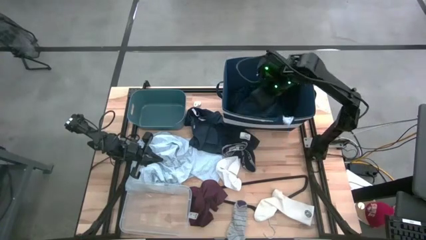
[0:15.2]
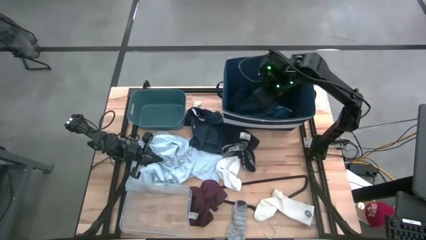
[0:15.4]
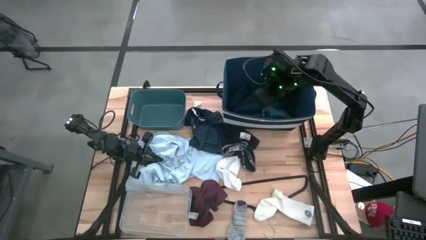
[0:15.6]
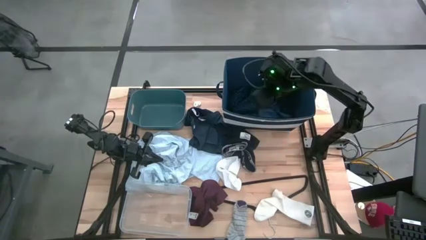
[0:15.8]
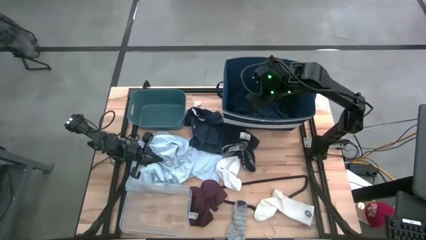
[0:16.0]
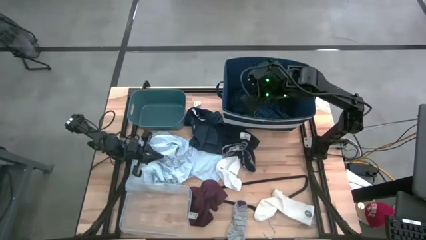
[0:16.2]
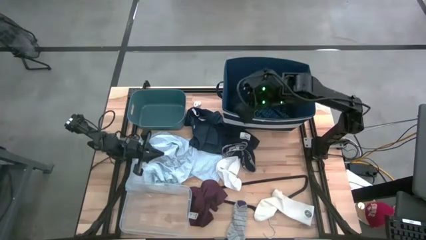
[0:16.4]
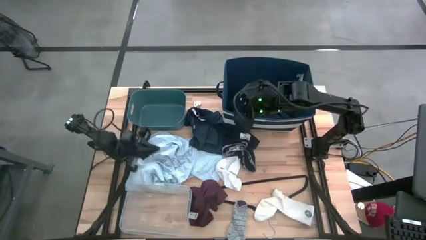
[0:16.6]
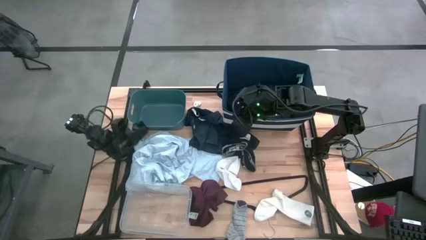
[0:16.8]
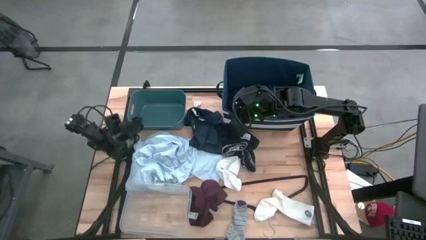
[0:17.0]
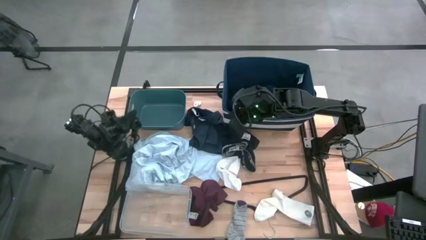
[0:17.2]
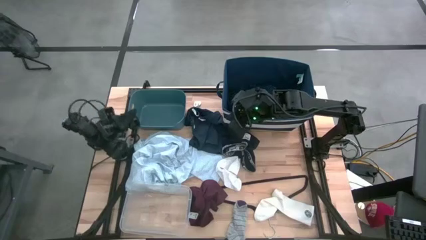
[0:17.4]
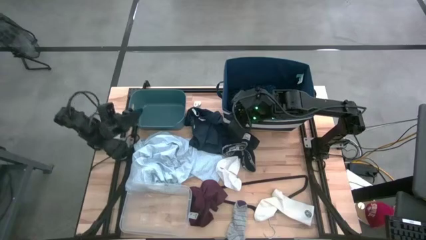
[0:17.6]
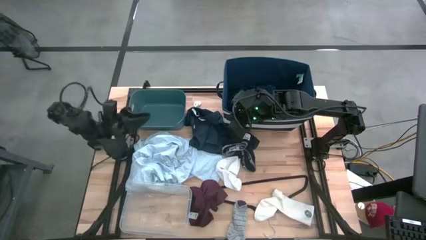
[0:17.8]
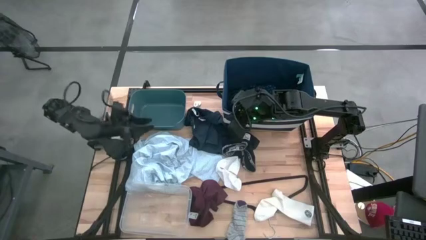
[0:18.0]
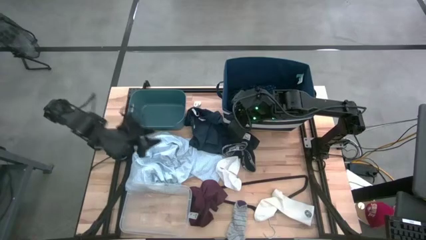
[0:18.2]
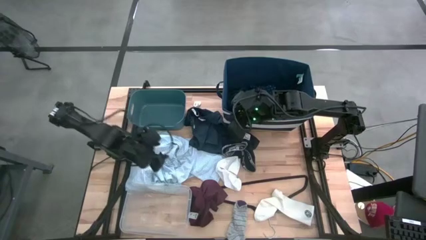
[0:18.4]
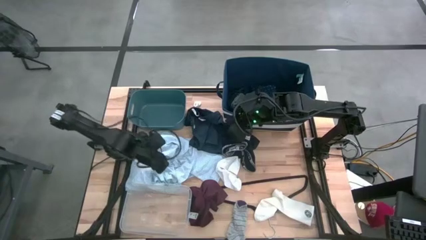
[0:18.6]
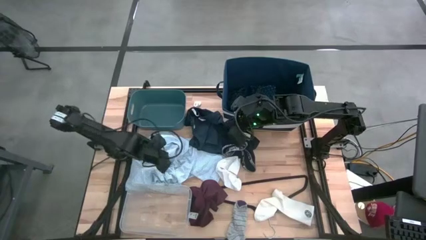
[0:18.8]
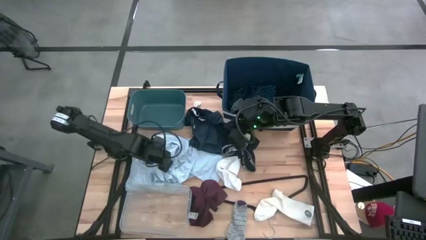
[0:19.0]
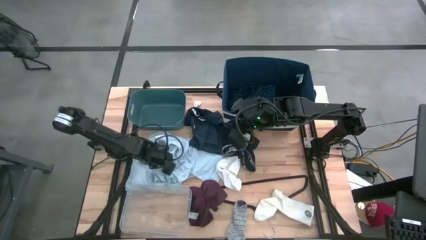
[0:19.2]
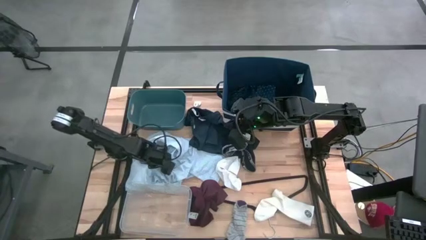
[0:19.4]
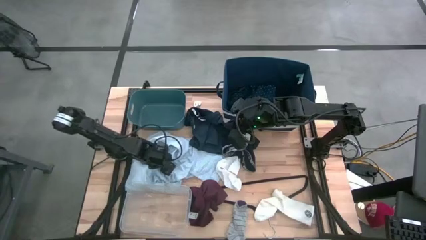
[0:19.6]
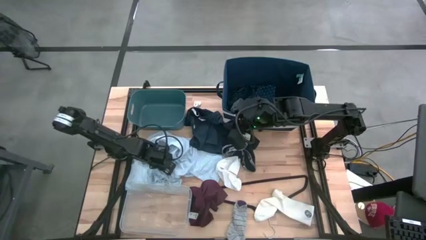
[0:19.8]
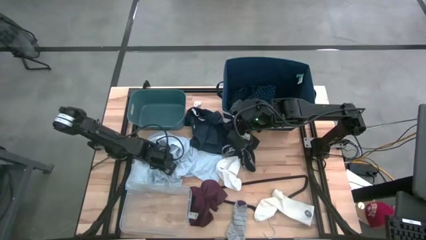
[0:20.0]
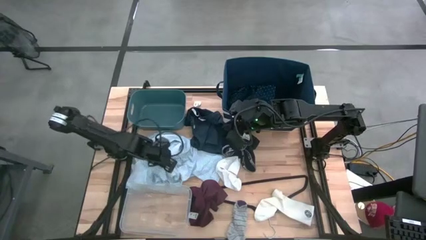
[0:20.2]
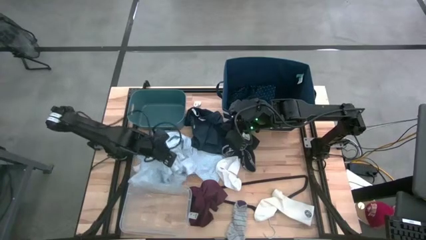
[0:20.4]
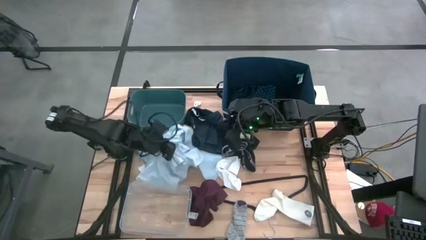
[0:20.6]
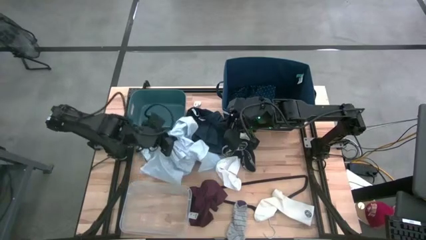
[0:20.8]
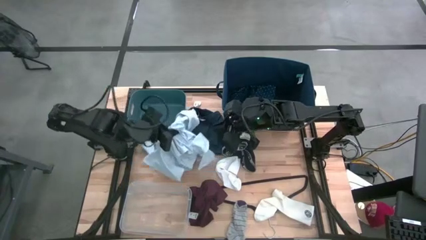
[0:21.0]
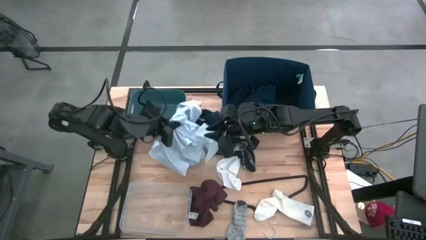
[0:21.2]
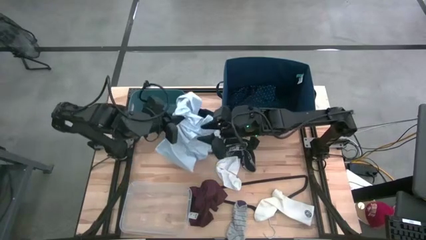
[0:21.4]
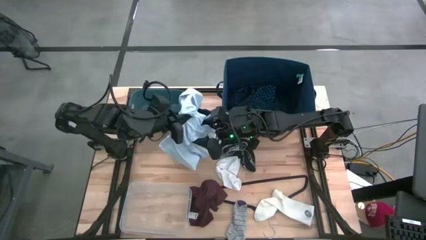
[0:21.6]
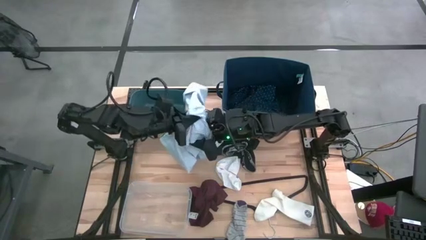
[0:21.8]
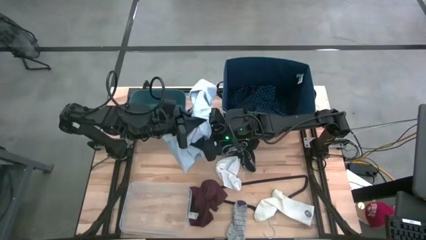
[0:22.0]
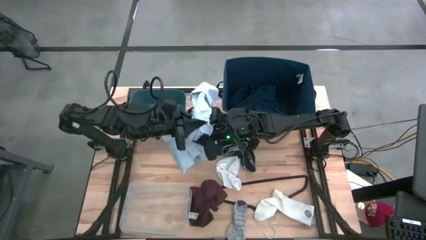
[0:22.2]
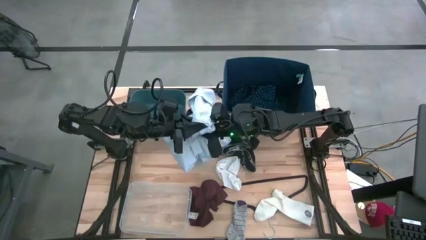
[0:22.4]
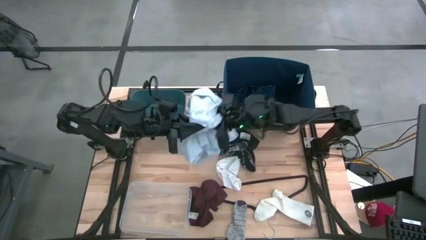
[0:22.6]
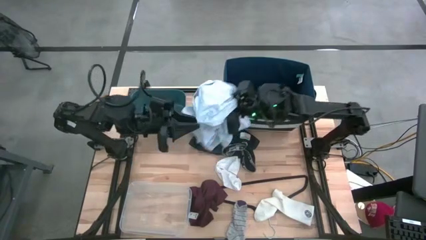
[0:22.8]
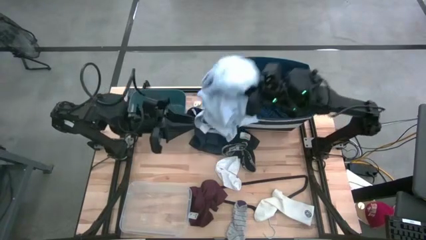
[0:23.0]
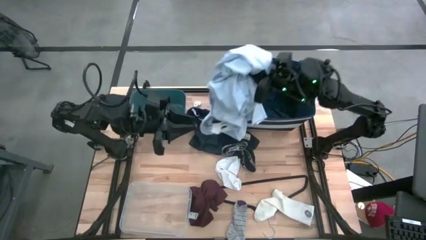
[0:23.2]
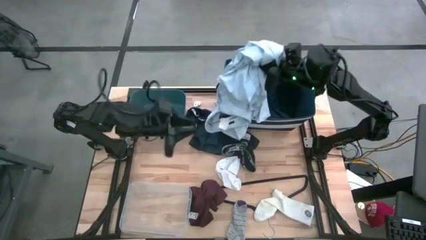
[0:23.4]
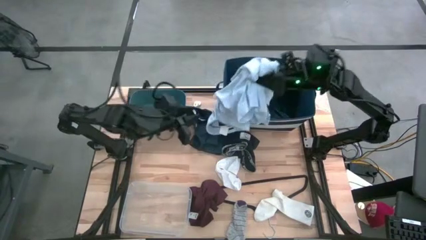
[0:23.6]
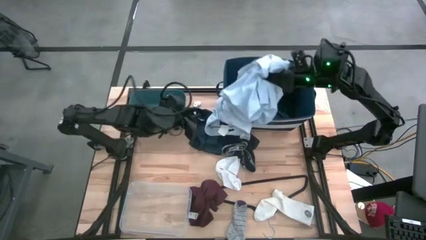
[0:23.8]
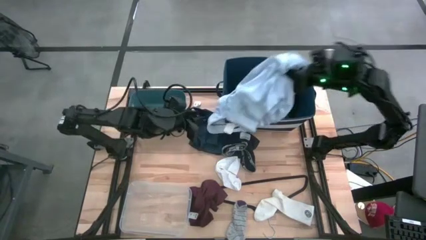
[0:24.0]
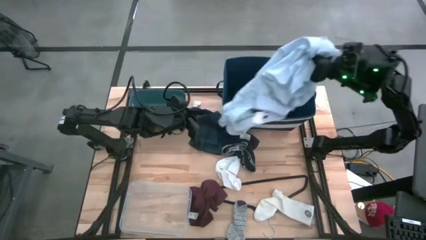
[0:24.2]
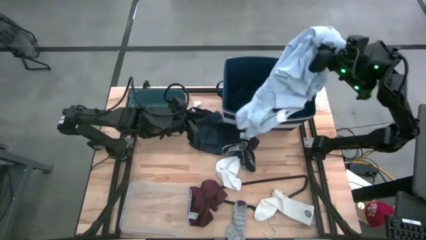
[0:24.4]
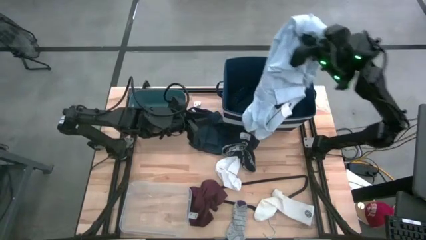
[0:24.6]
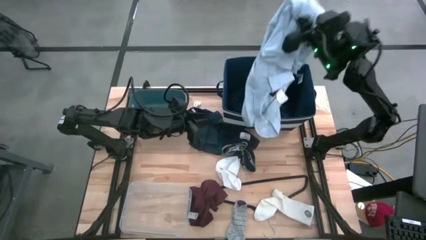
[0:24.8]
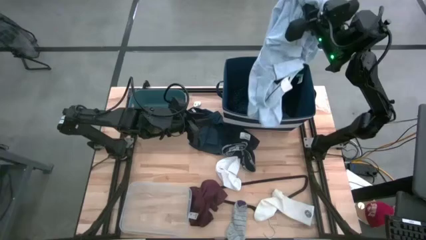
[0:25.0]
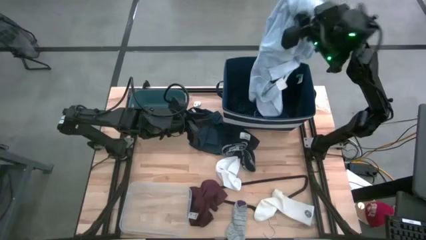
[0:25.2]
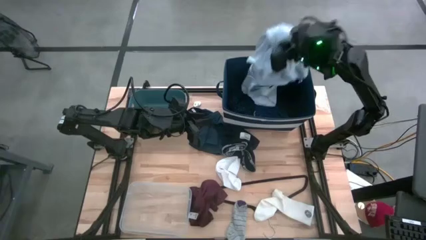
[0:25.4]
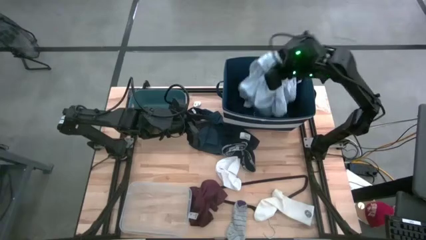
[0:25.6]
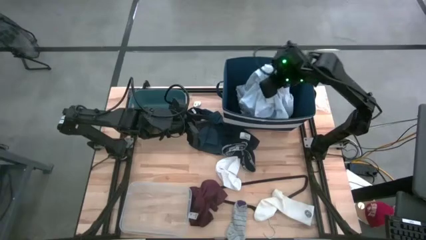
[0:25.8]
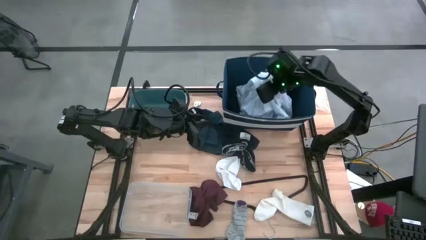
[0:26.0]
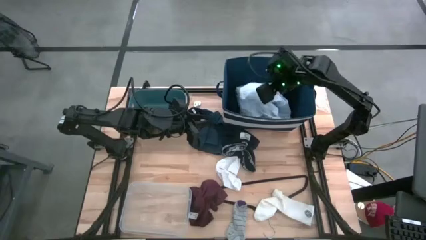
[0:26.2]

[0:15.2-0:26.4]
Task: Pick & Place Cloths
Put the white patient gown into the blue bin
